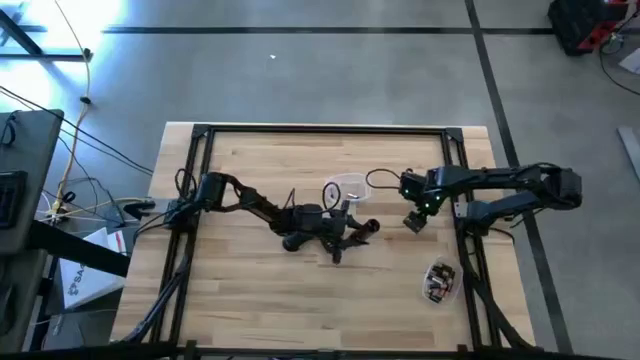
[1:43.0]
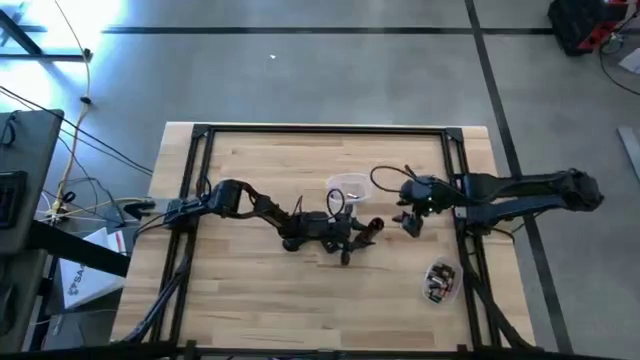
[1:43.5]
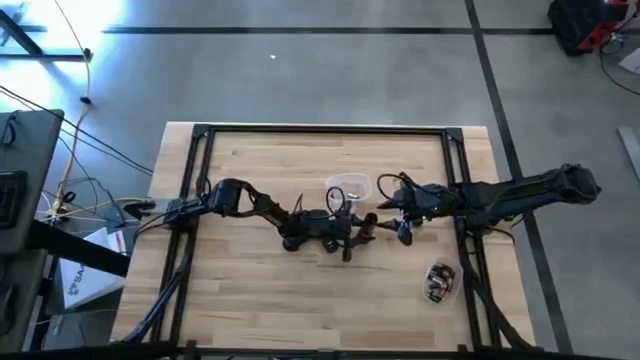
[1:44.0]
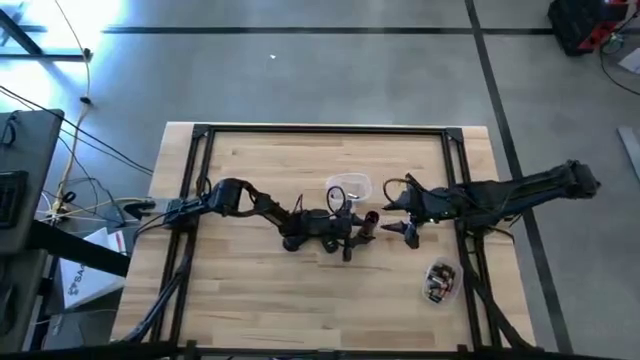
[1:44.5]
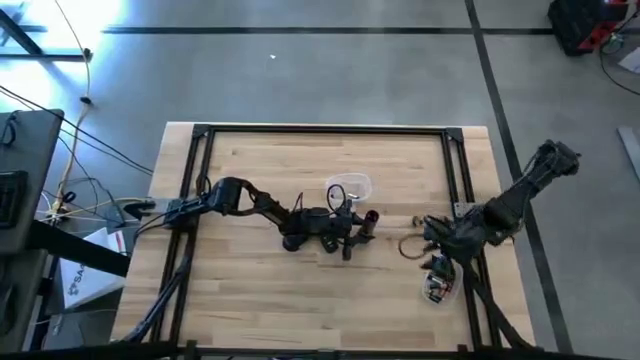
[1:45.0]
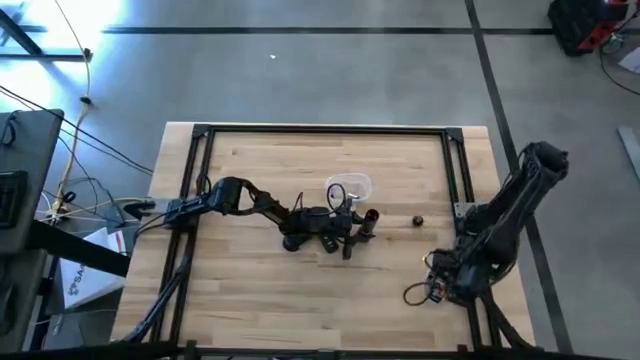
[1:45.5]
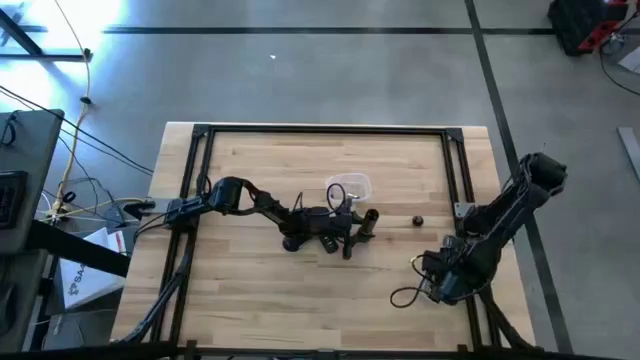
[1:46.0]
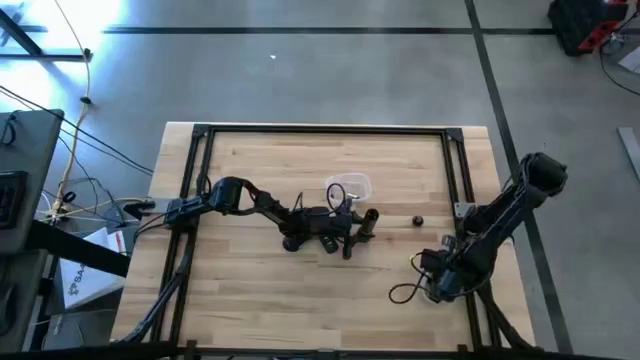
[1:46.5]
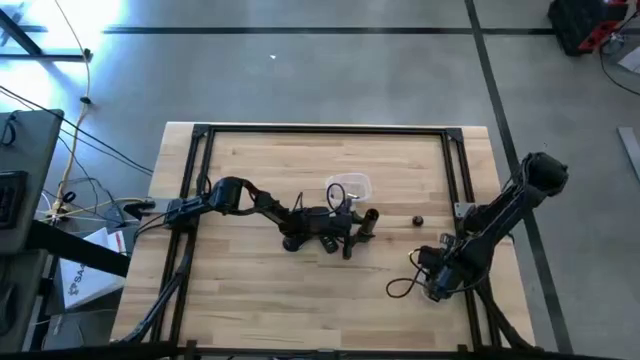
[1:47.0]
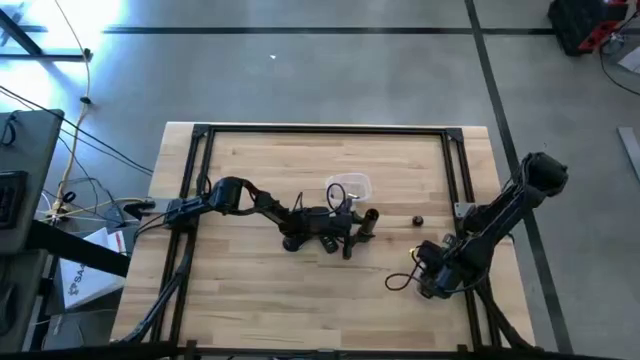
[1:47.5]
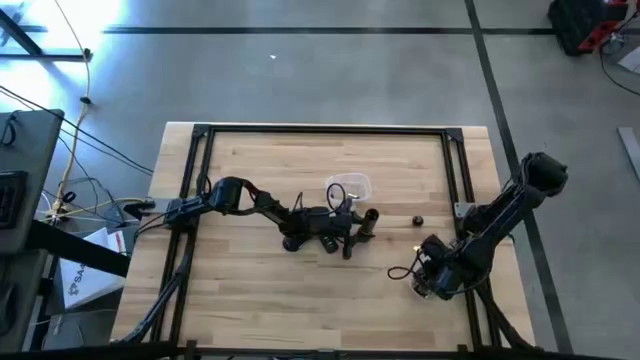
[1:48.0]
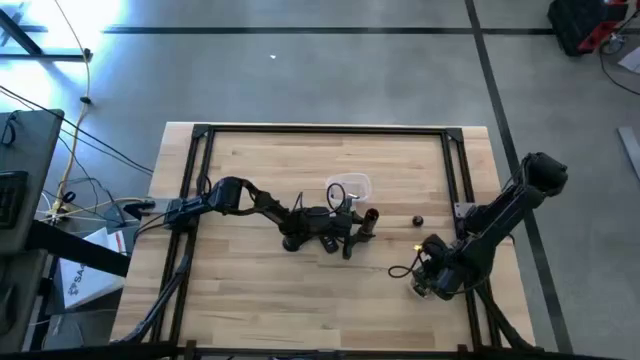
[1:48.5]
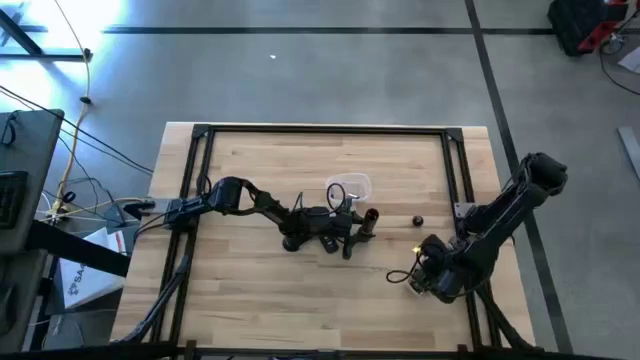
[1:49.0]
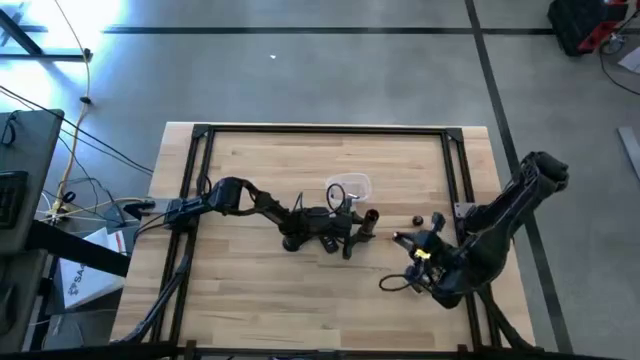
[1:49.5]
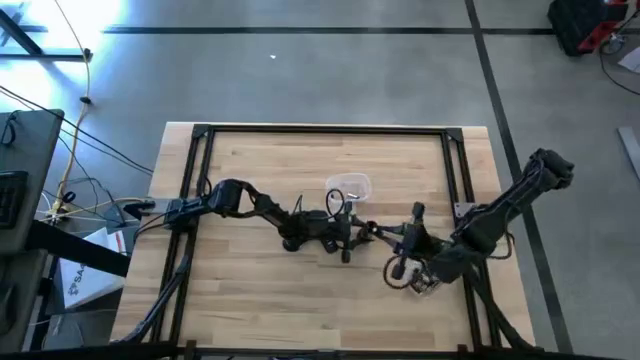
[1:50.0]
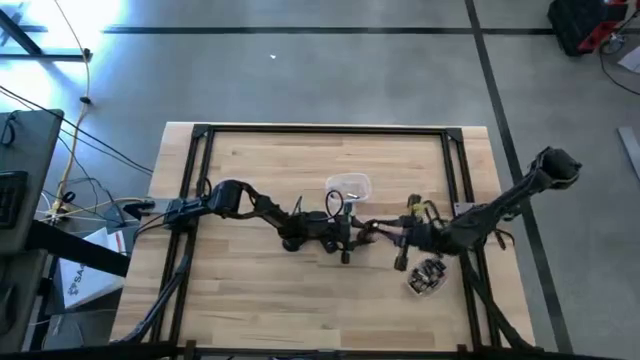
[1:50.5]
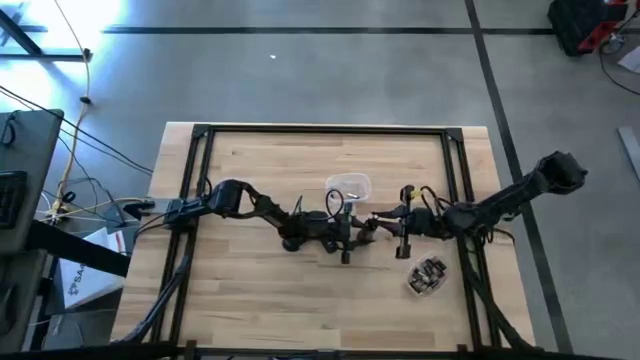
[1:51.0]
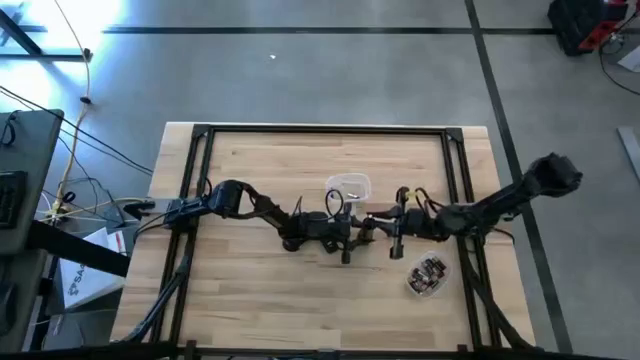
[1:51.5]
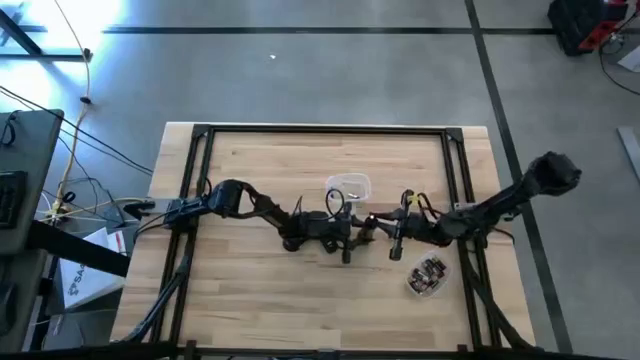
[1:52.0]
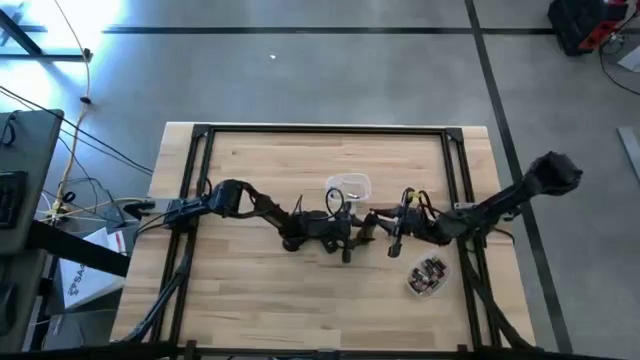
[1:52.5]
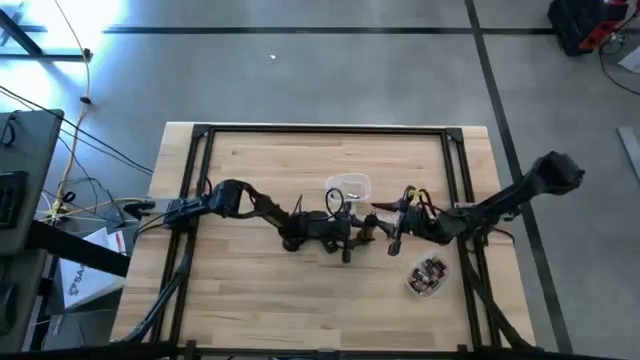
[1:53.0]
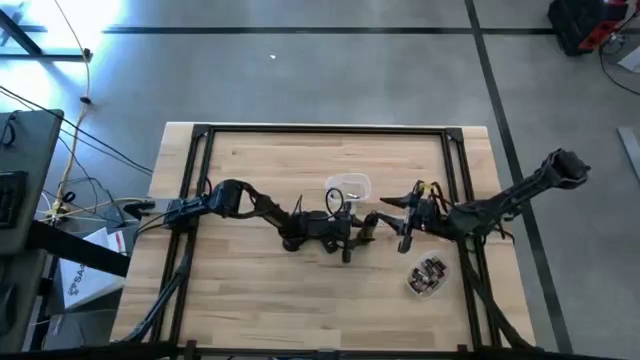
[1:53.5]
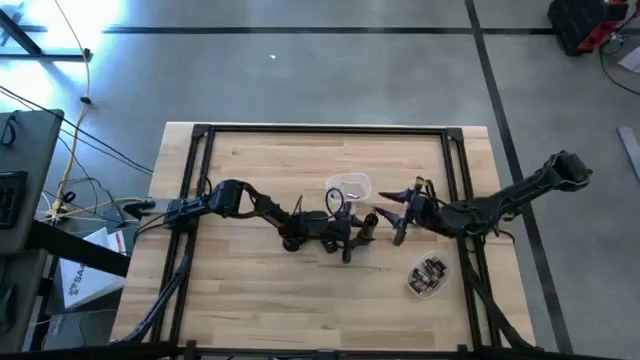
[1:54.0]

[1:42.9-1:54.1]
Task: Insert battery
Insert the black battery into the flashlight

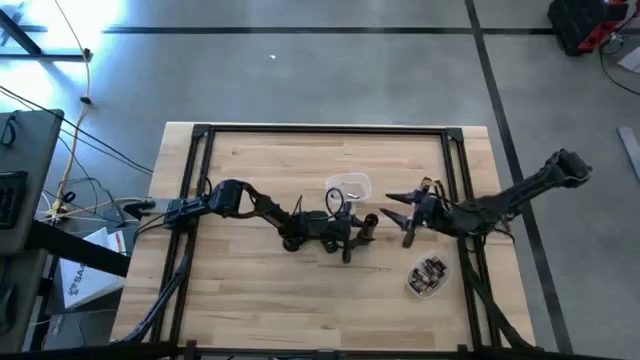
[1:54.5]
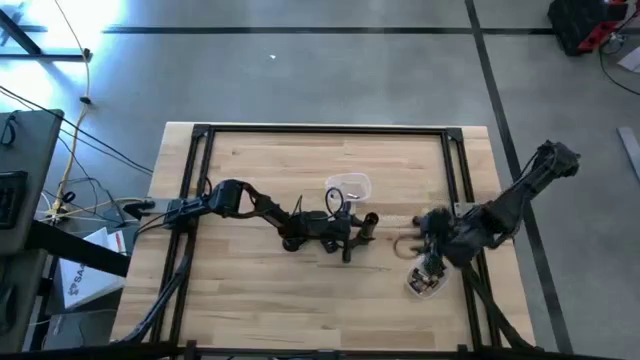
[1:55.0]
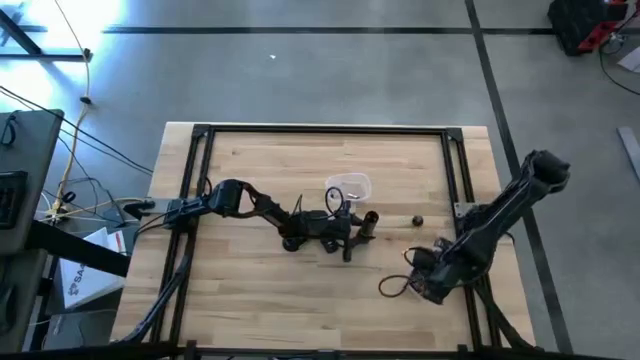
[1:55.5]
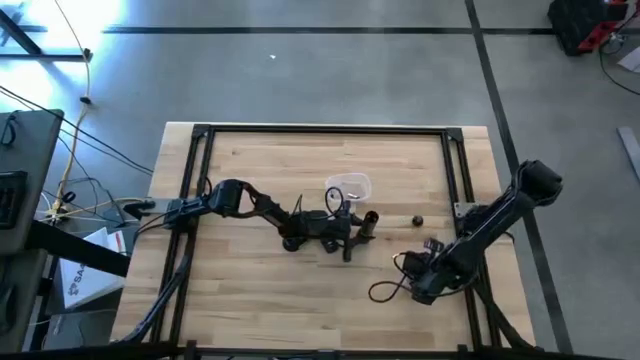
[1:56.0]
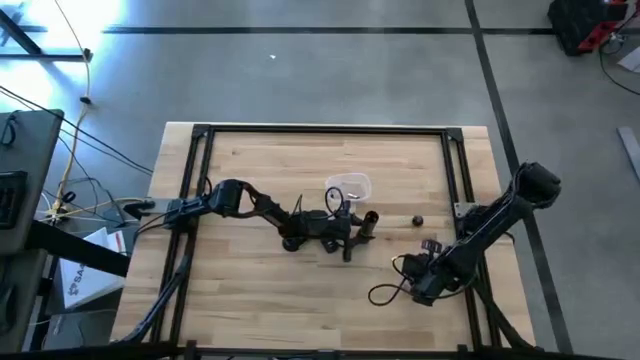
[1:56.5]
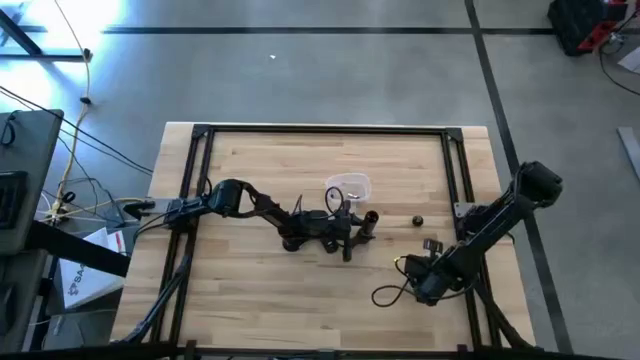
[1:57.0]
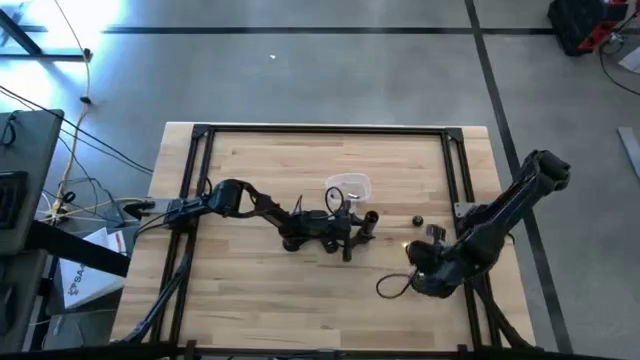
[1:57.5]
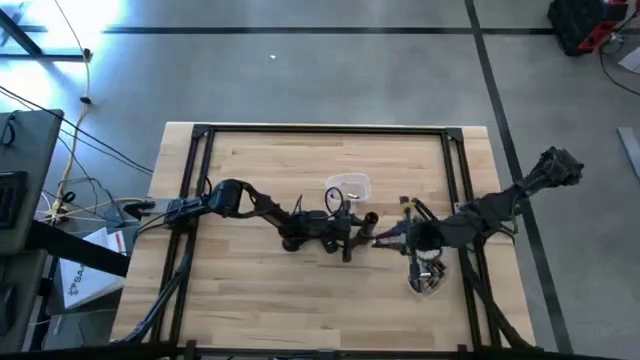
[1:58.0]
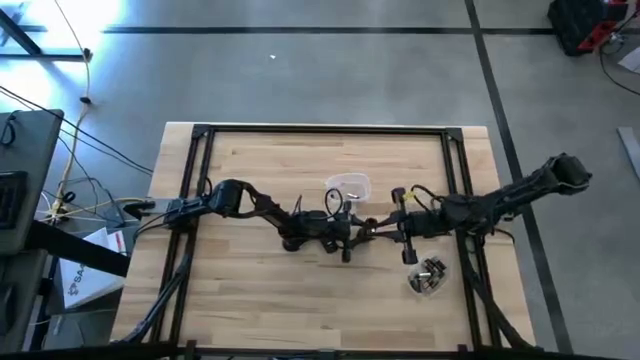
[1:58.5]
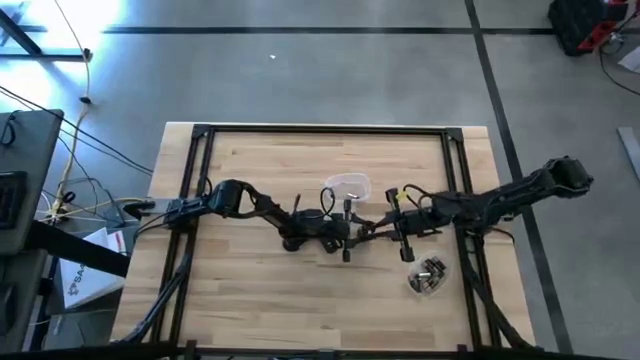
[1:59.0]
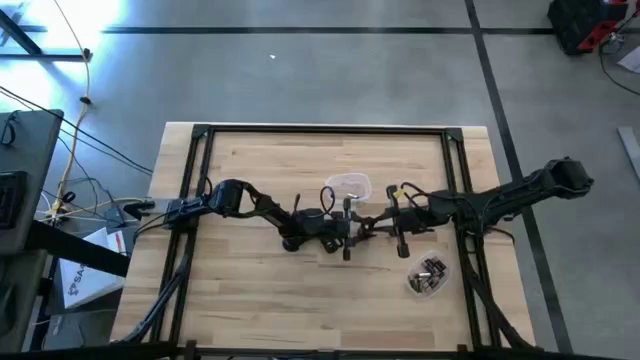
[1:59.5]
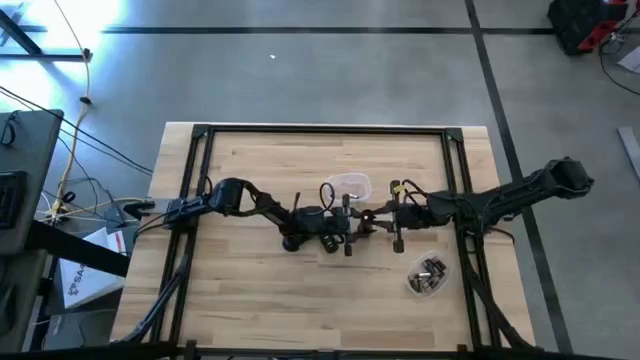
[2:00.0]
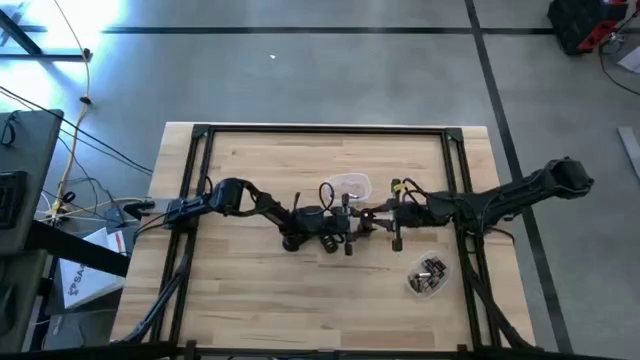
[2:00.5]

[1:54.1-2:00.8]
Insert the black battery into the flashlight

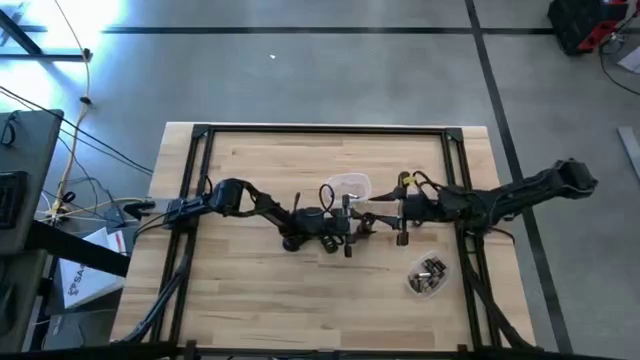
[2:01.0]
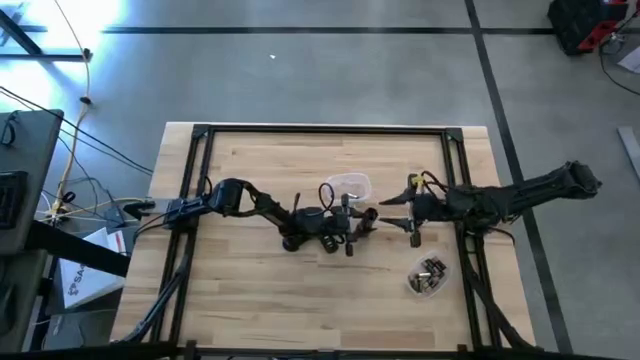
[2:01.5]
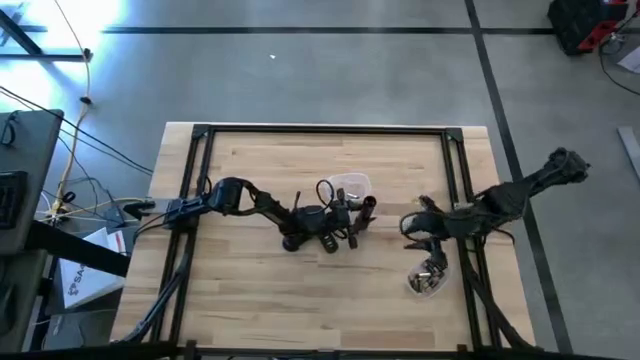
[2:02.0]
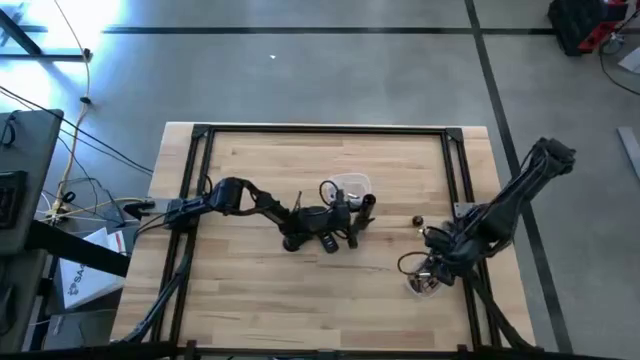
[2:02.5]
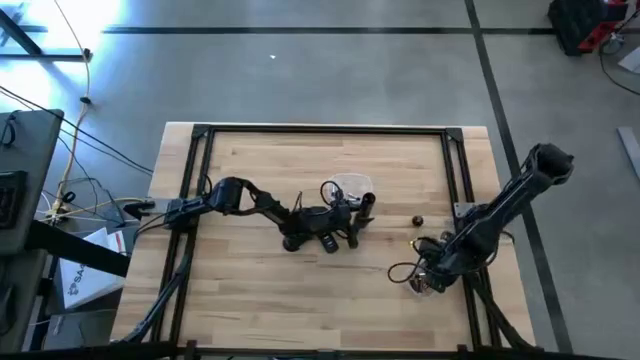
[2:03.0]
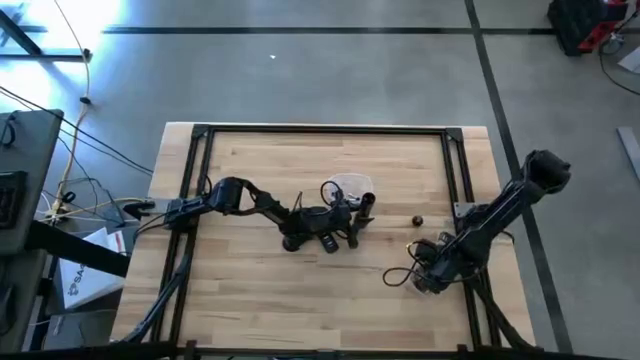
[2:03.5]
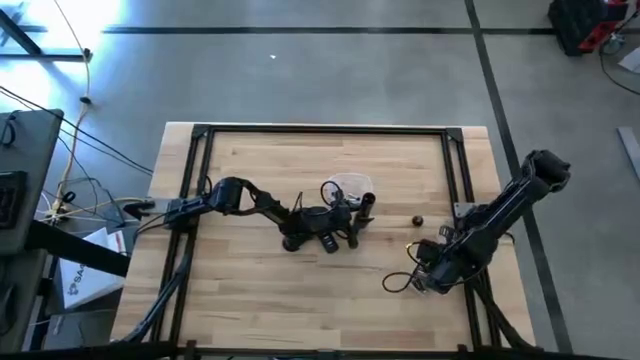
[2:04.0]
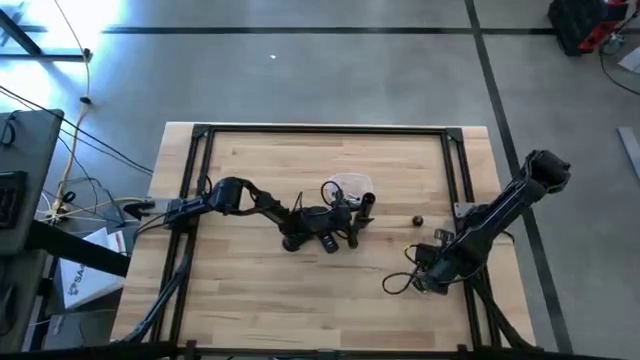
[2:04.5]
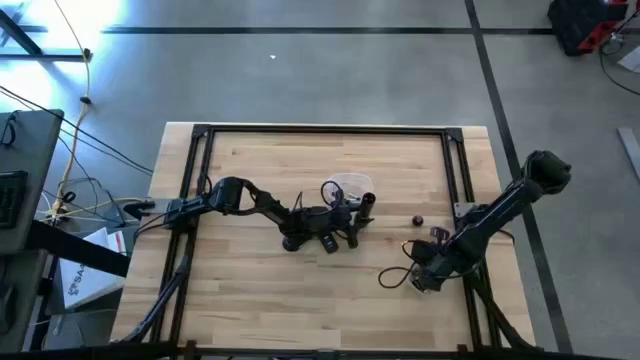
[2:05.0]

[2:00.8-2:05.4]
Insert the black battery into the flashlight
